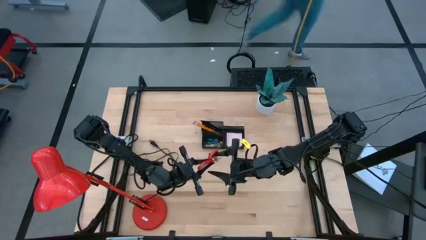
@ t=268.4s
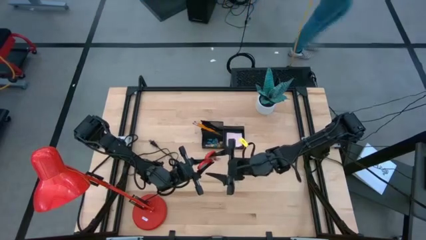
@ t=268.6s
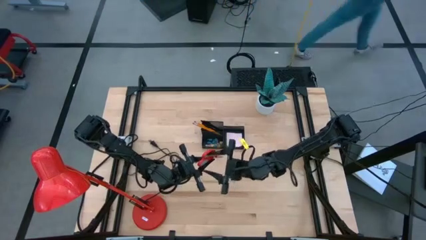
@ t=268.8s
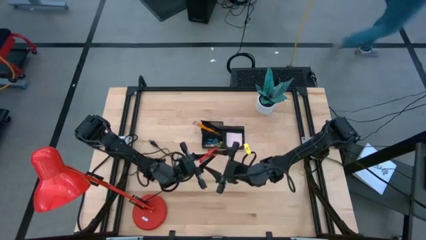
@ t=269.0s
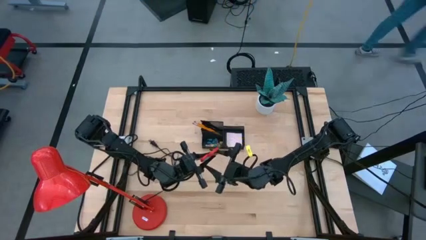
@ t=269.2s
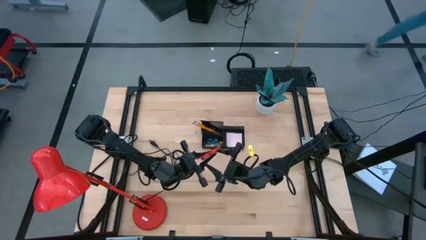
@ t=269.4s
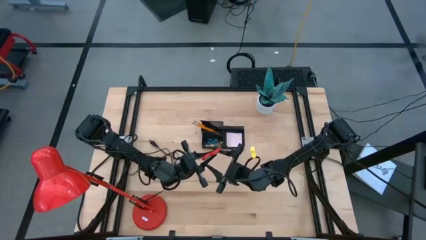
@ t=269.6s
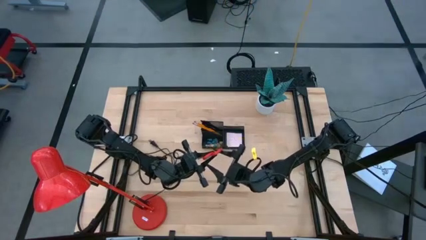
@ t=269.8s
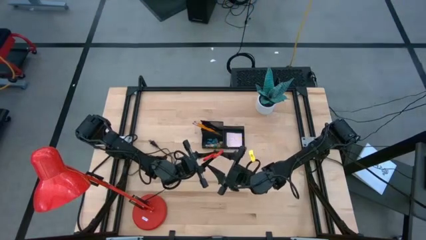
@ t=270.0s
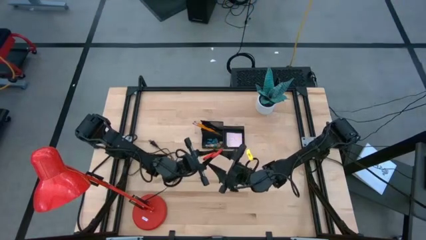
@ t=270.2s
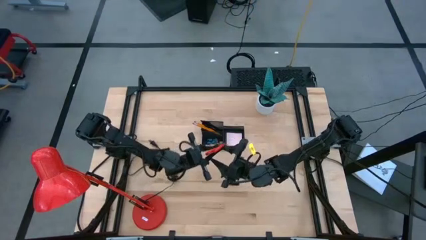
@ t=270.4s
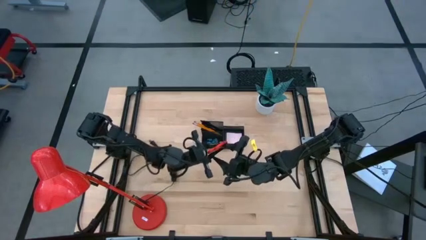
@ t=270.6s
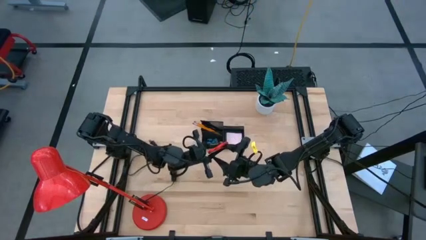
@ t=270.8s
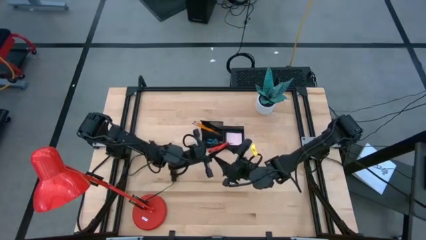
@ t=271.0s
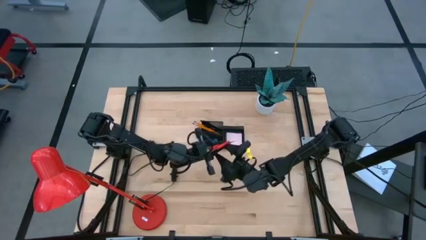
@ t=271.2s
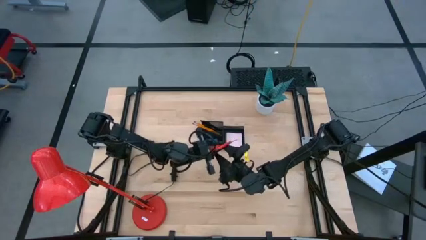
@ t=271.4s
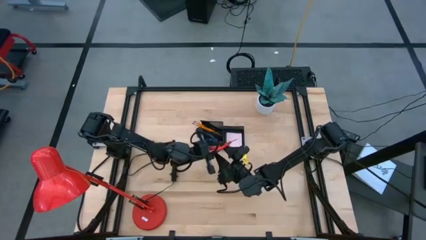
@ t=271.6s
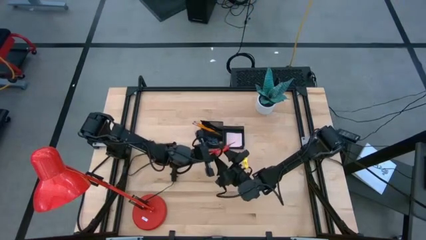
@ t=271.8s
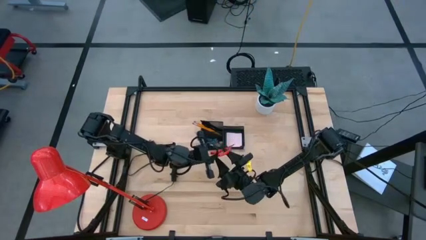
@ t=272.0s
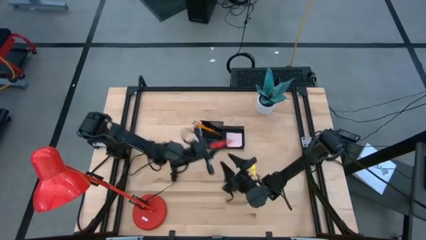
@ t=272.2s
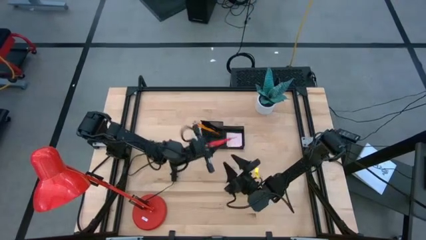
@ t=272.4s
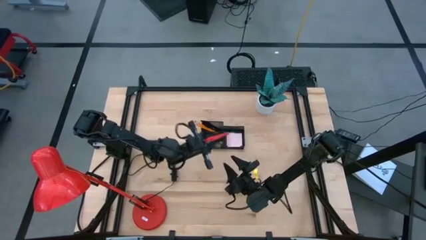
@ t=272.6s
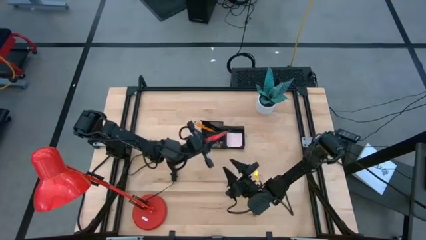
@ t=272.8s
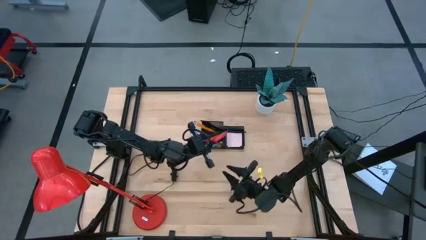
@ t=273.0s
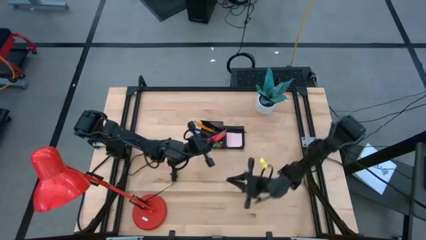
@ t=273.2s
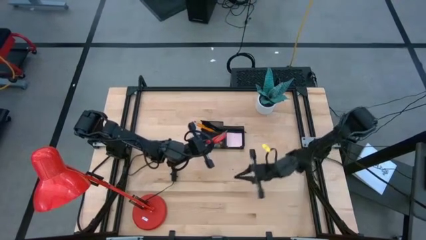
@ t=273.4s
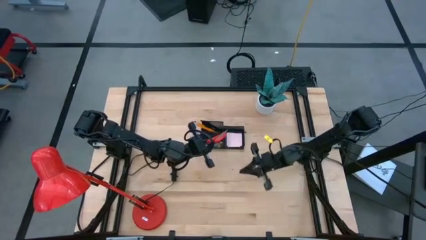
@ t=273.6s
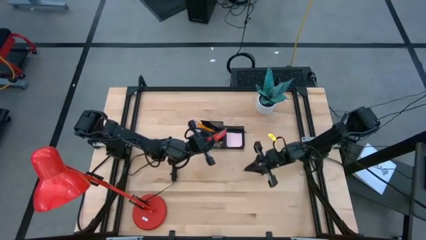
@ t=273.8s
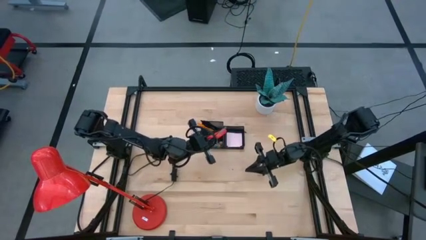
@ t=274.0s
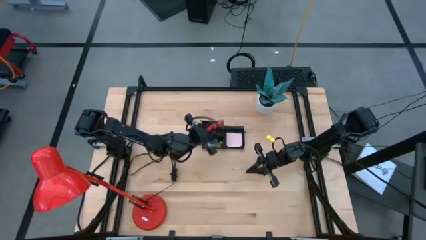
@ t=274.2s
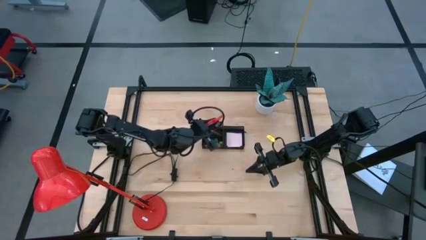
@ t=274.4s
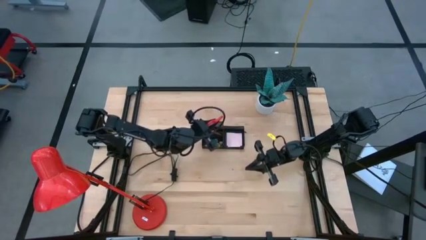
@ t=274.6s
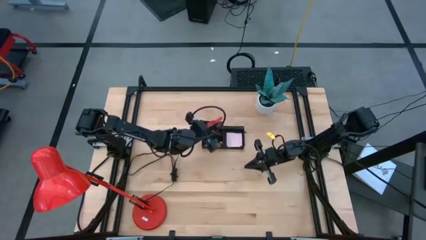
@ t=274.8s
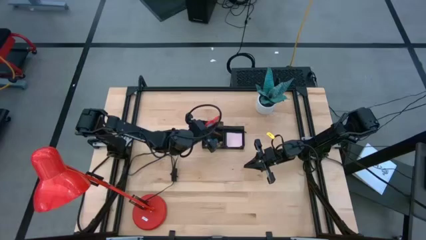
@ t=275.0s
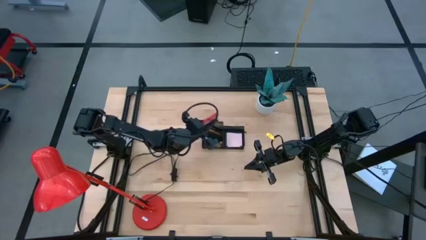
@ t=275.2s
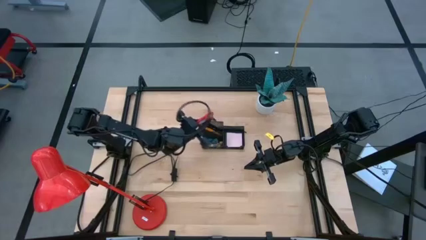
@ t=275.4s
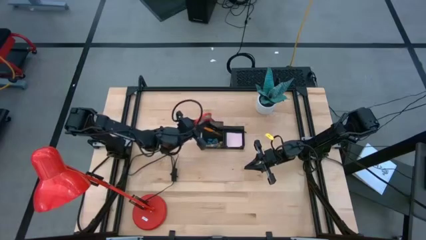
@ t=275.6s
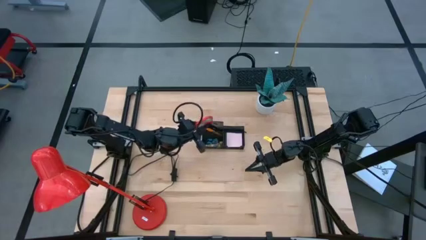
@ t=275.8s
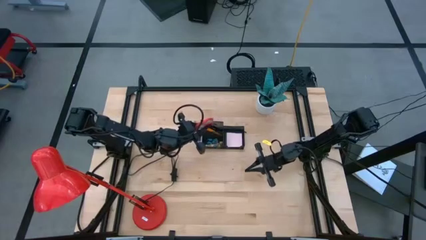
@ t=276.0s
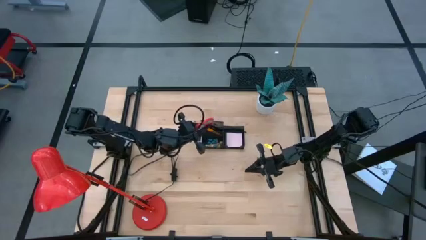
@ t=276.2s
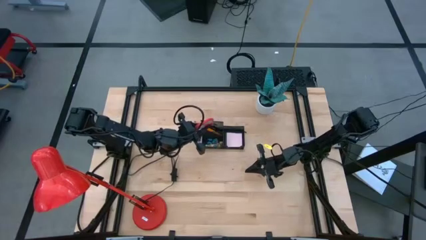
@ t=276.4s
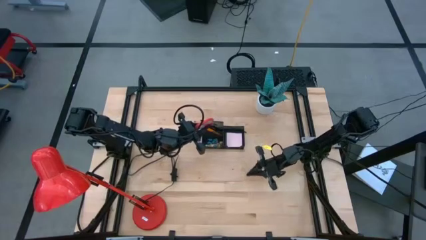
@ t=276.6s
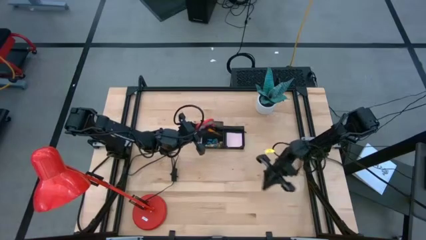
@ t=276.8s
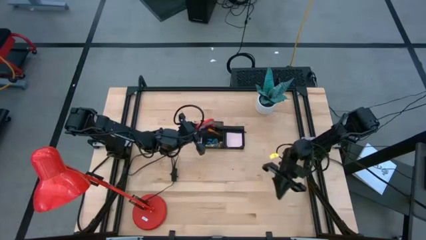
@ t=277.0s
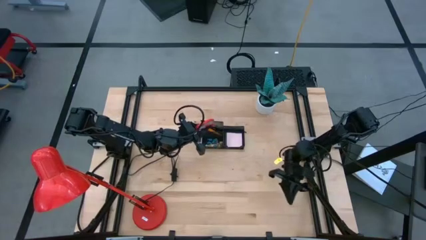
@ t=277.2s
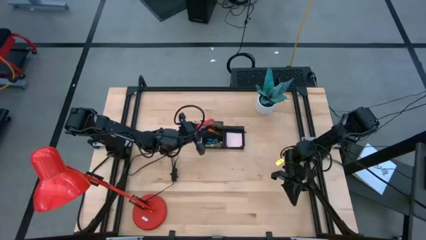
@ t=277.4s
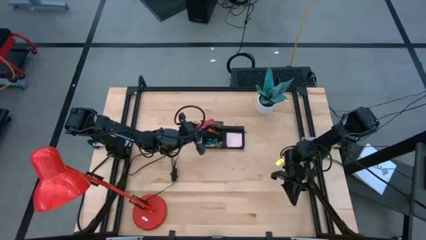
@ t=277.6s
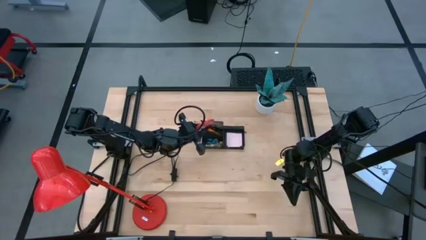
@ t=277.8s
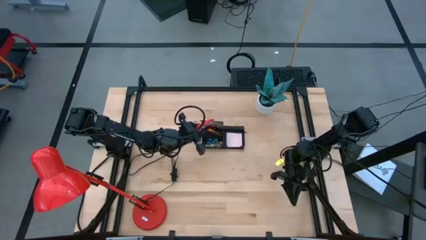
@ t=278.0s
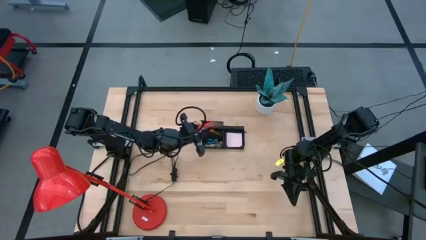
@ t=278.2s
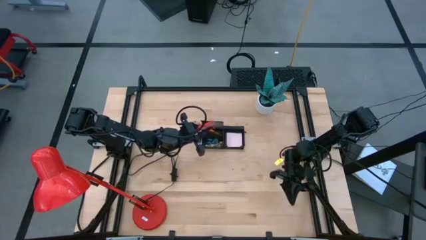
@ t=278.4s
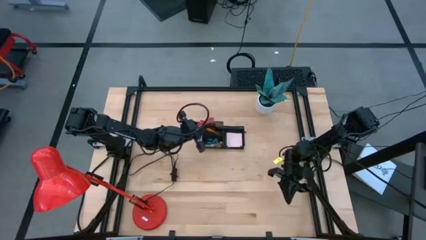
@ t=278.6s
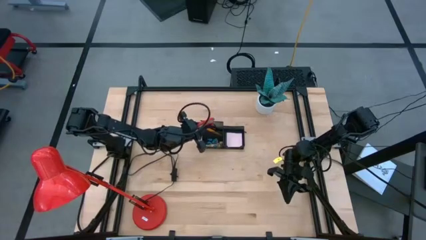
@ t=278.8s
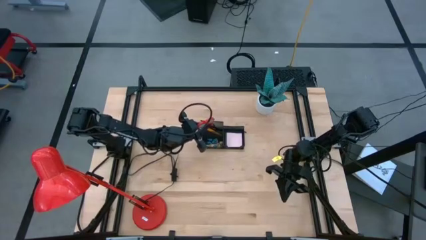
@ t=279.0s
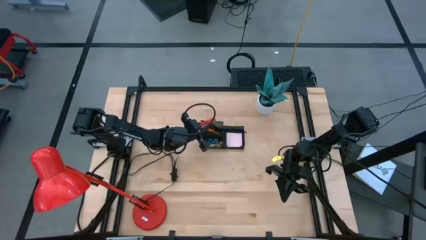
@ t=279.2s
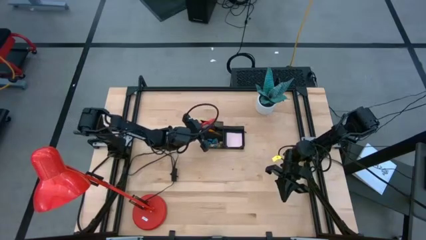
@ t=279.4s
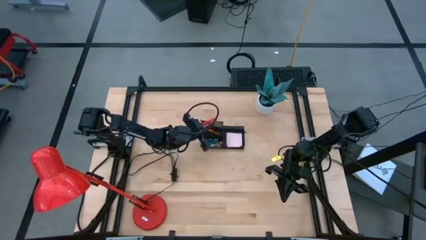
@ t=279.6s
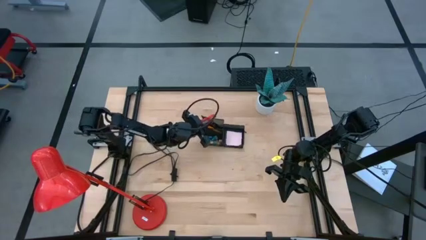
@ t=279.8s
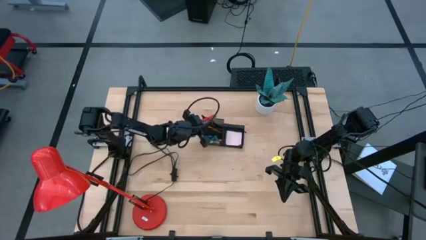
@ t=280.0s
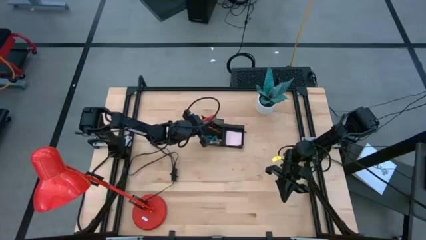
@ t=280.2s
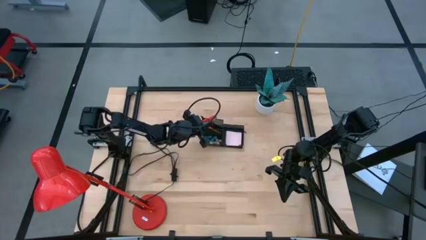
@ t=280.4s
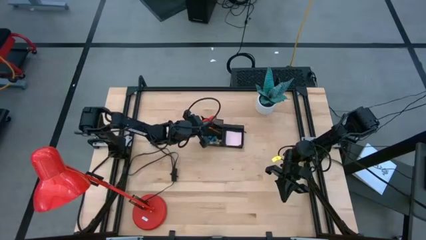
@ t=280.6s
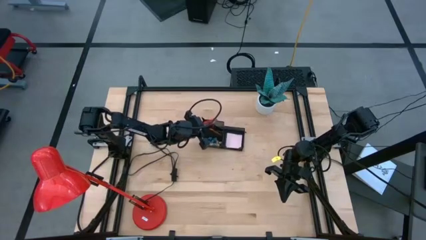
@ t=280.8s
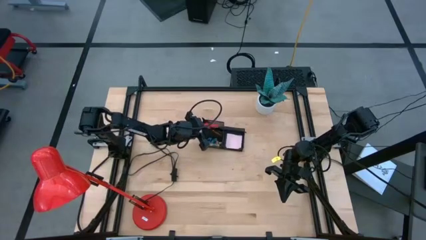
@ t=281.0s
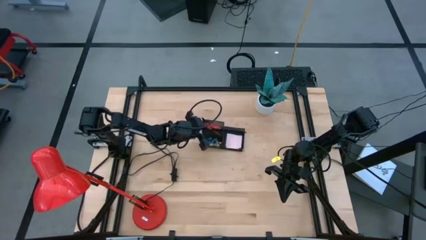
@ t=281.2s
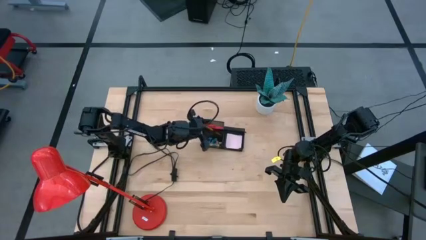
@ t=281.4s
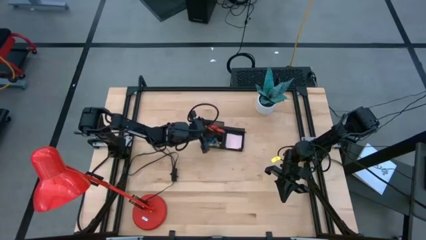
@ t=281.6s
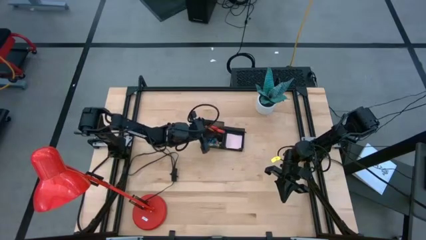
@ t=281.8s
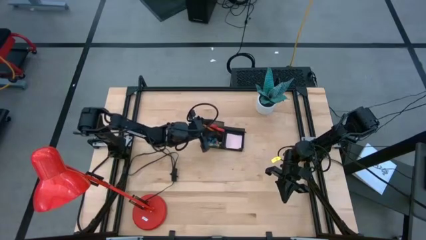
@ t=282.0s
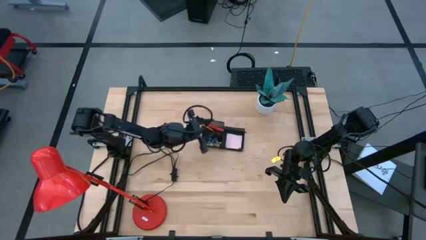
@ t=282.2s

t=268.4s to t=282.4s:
Task: Pick and place office supplies into organizer
Put the red scissors into the black desk organizer

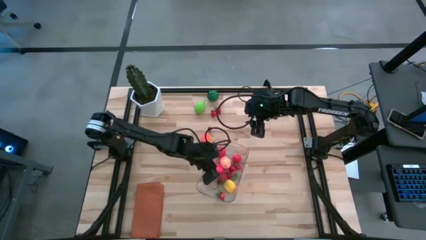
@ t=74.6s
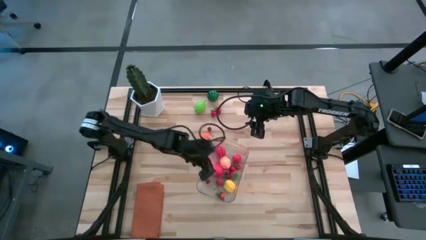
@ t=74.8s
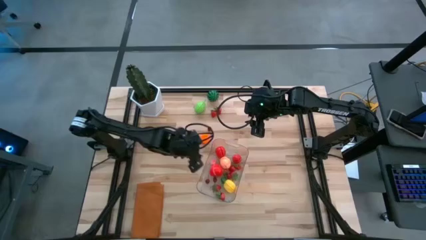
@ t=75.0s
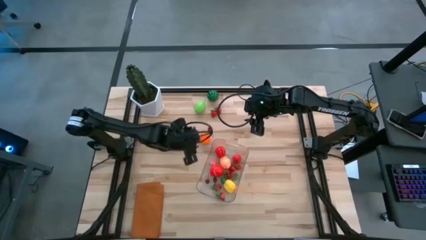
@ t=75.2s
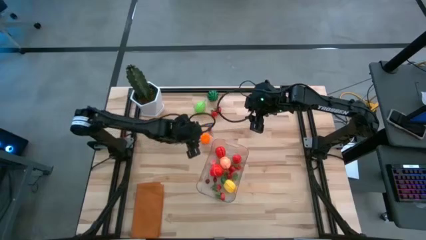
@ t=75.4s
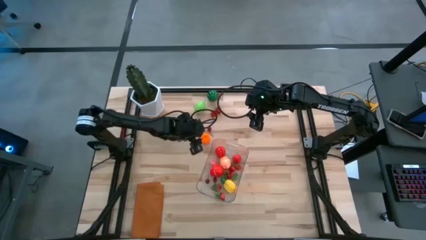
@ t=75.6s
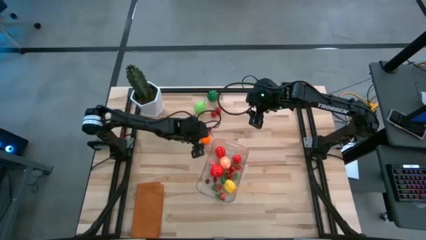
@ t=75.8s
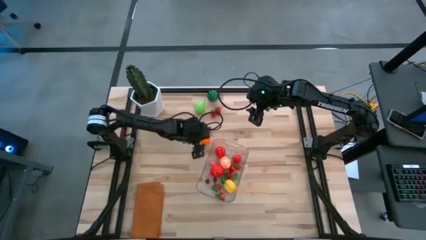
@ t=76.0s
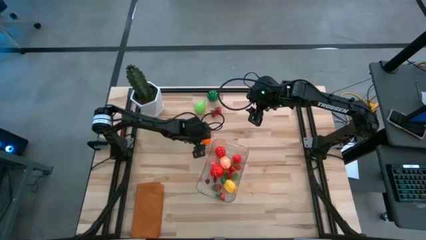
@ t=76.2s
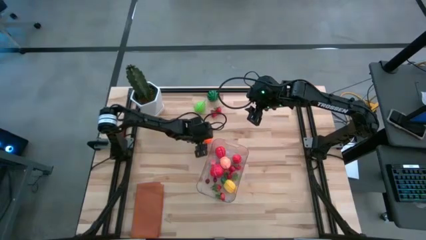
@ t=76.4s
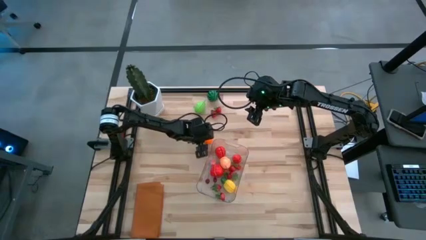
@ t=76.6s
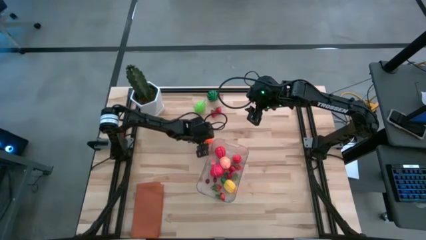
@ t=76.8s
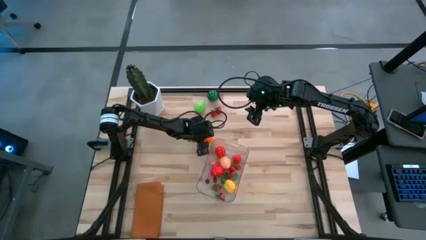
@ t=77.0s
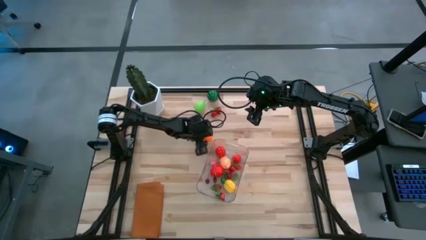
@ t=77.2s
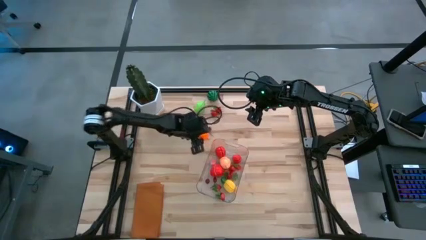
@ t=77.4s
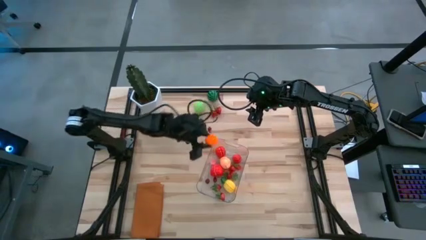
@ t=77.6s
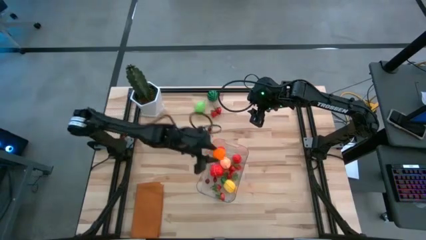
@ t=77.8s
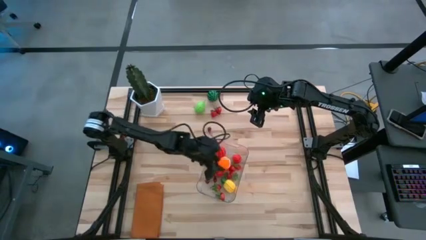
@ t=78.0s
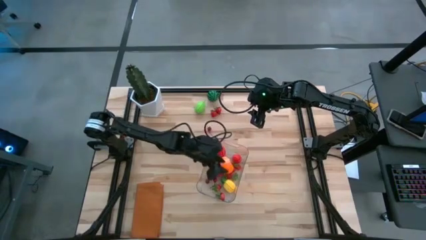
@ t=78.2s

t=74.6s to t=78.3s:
Task: Pick and placing Produce into tupperware
Put the orange pumpkin into the transparent bin
